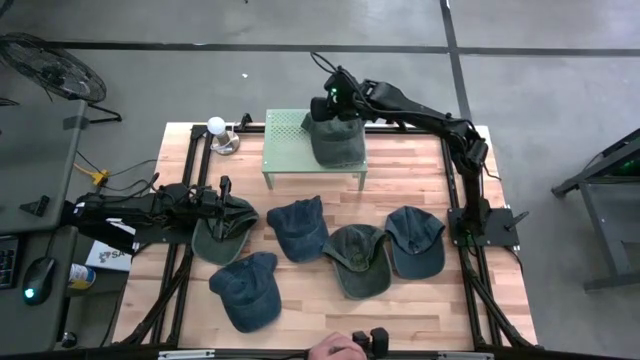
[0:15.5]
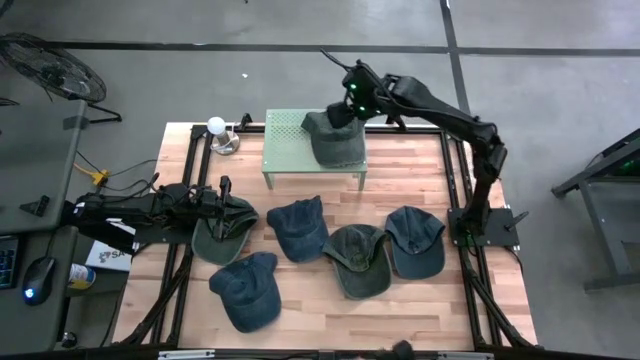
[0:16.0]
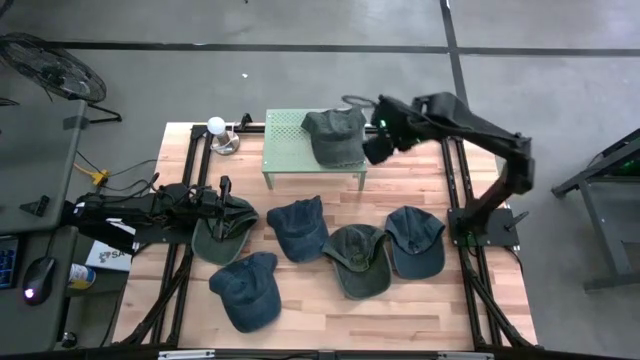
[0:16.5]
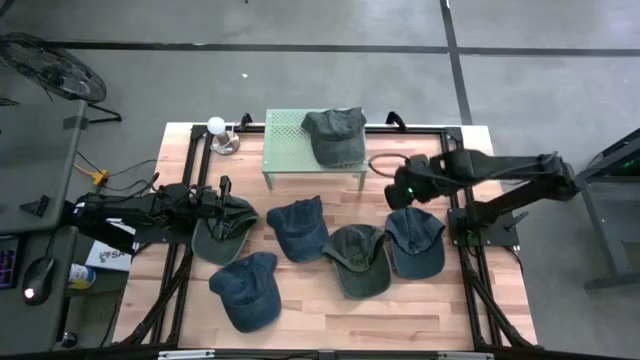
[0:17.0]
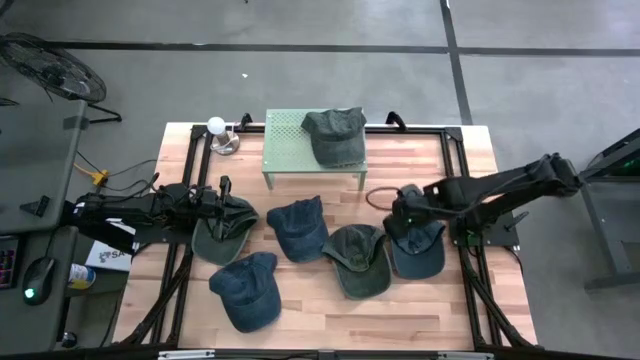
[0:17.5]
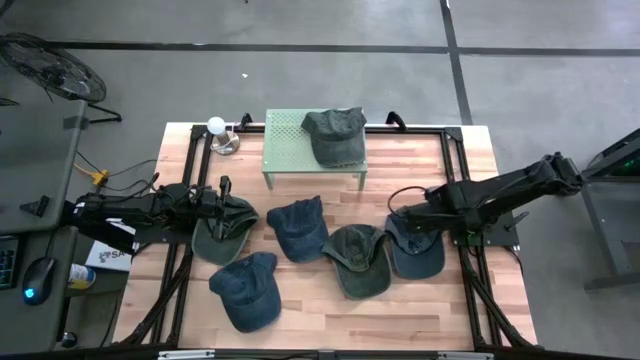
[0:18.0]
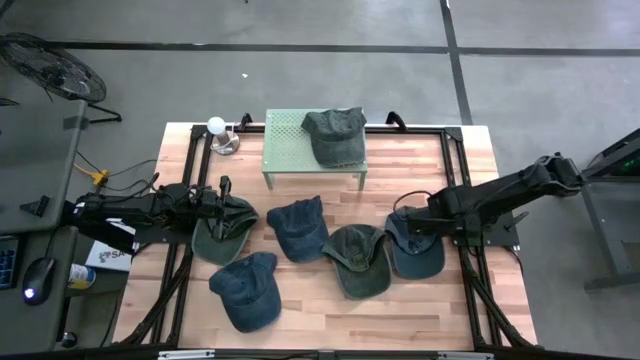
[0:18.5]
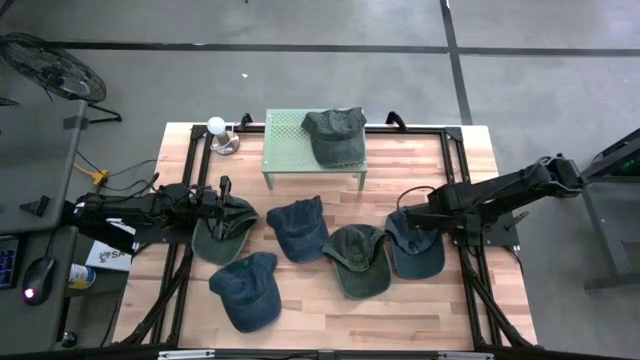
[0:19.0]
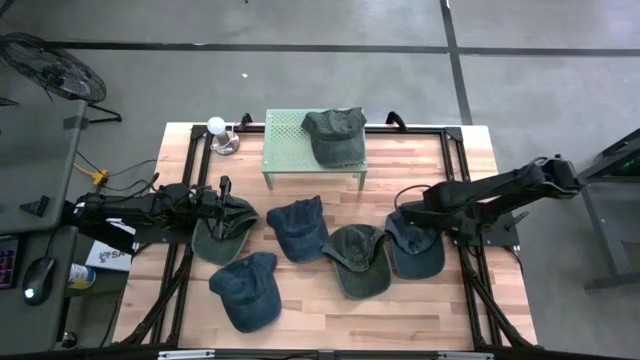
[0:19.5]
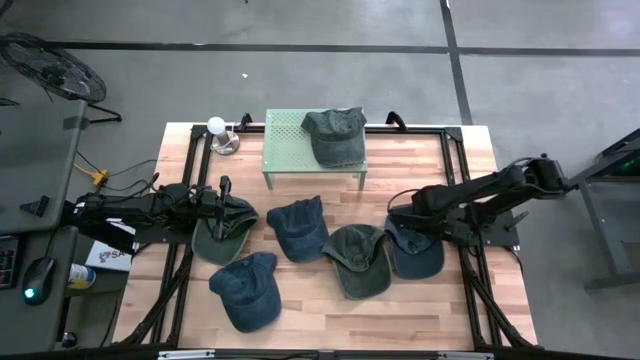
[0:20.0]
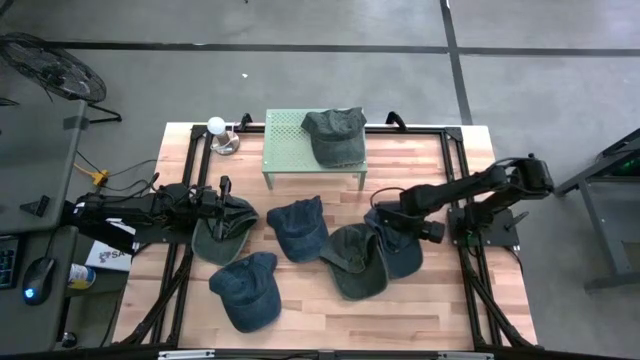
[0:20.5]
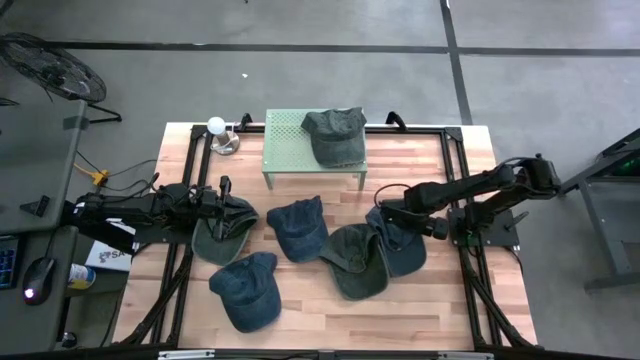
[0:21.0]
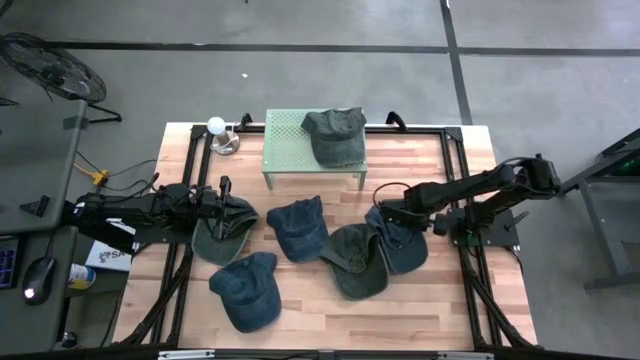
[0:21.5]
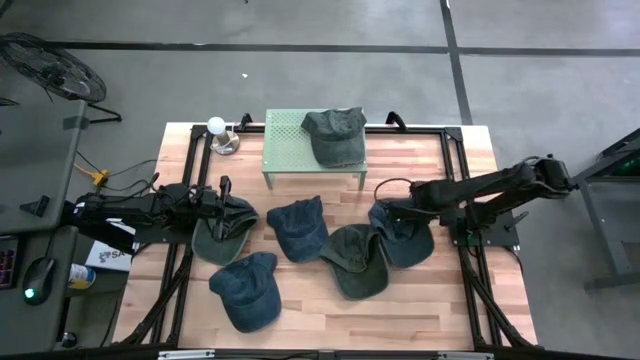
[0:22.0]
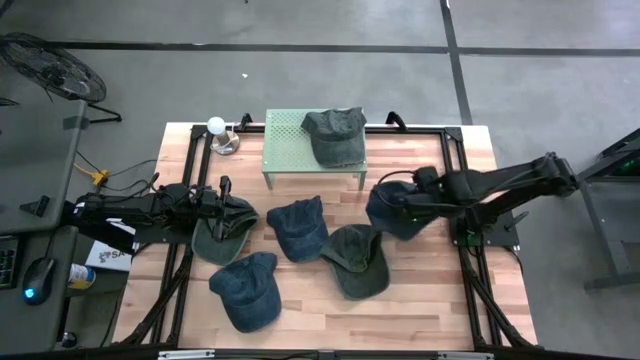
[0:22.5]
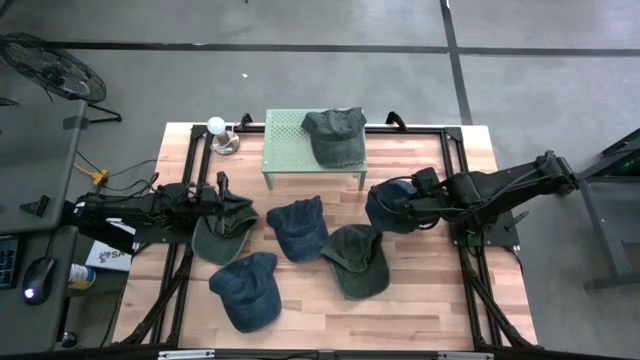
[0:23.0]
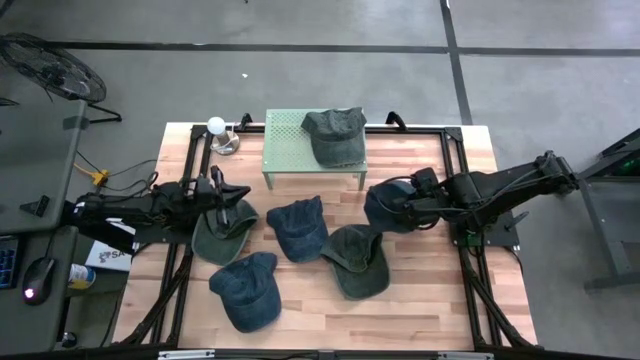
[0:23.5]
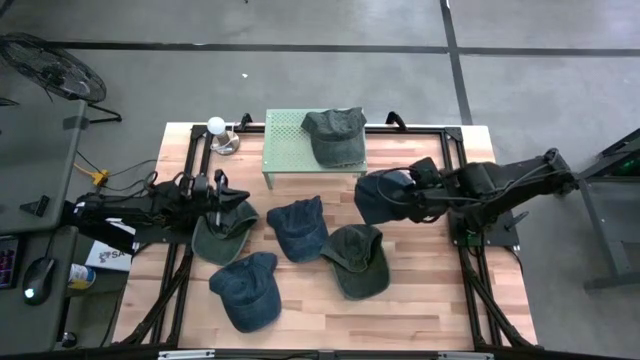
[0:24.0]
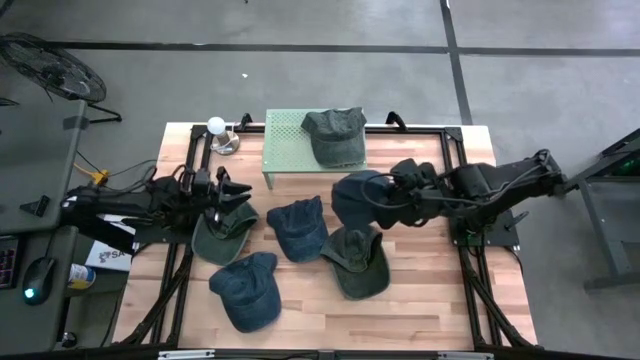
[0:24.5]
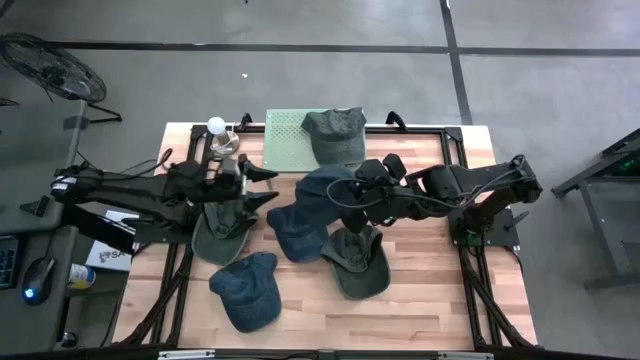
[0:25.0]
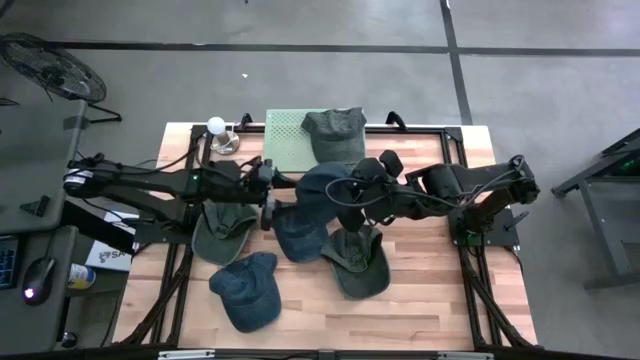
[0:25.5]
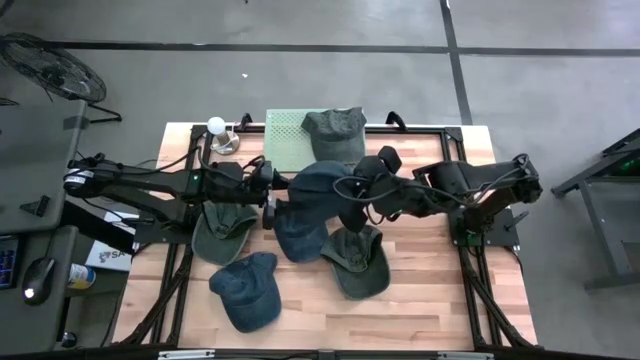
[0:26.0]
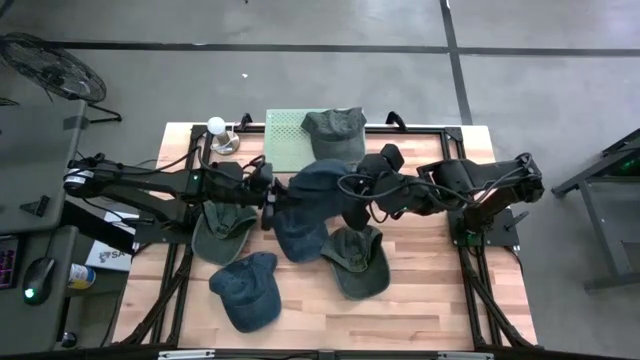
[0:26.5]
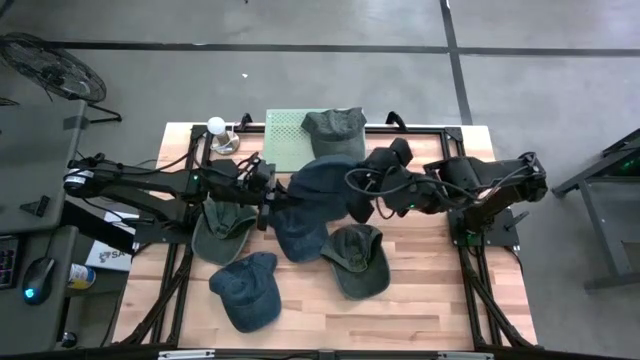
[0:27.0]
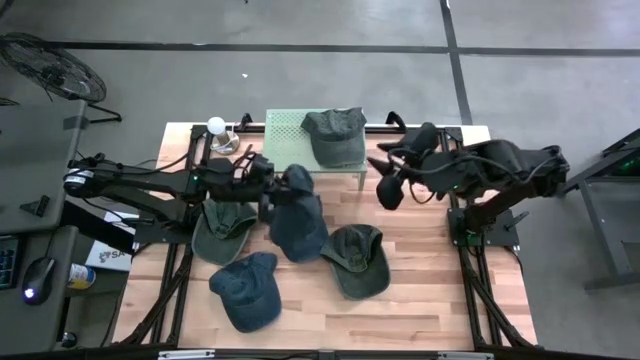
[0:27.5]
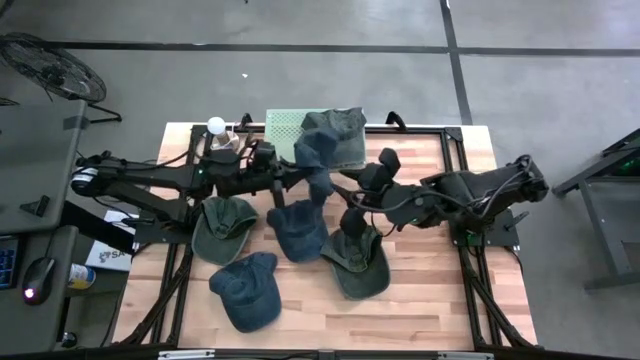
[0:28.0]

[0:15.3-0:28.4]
Task: Pick & Place hat
Put the right blue cap on the shelf

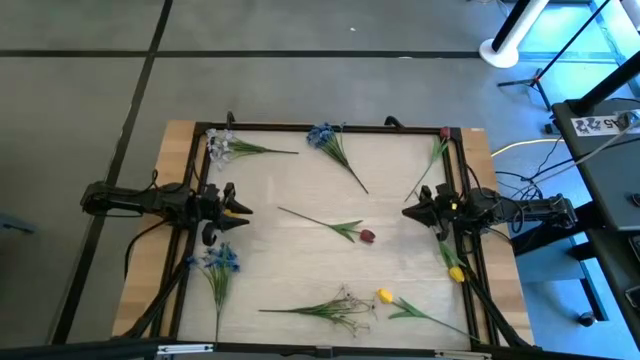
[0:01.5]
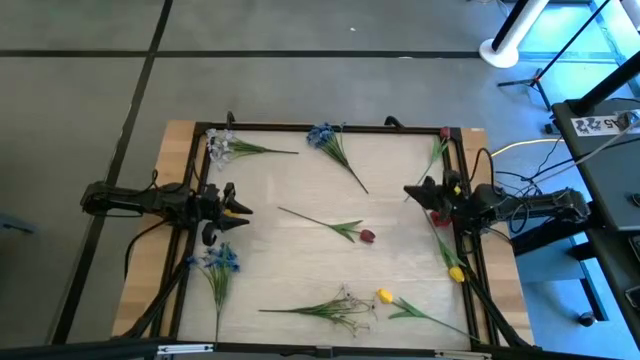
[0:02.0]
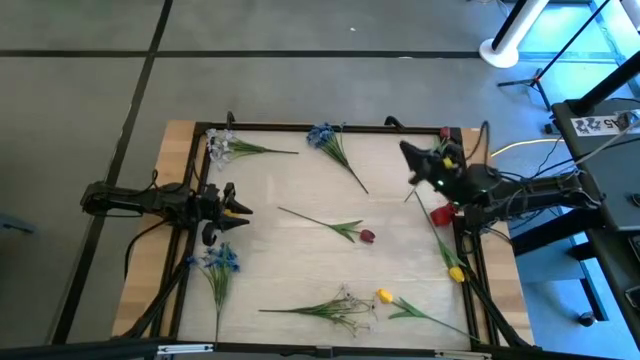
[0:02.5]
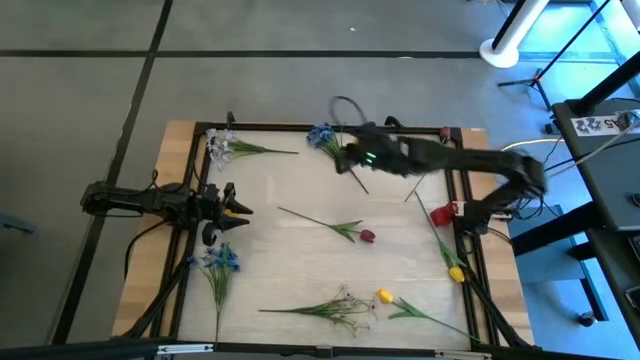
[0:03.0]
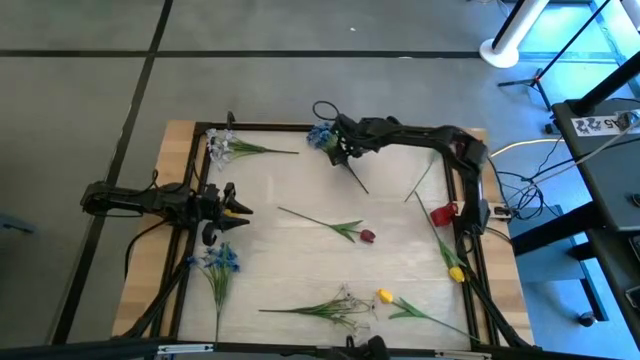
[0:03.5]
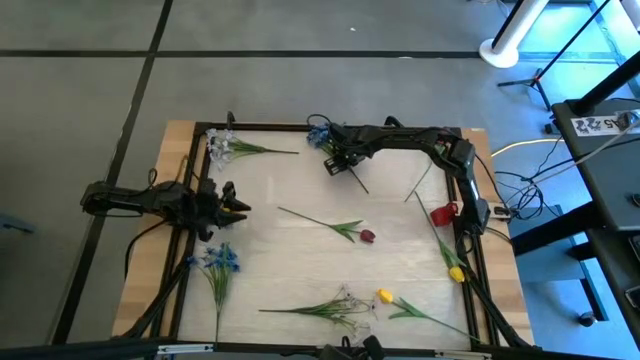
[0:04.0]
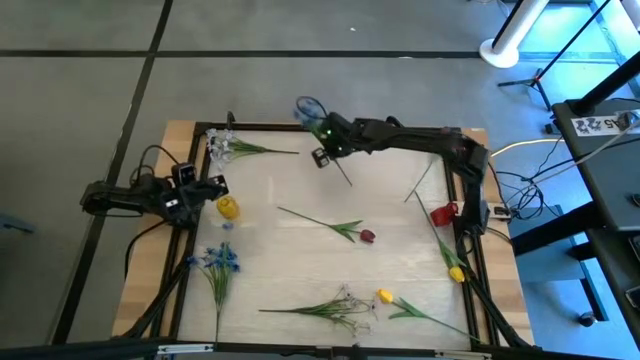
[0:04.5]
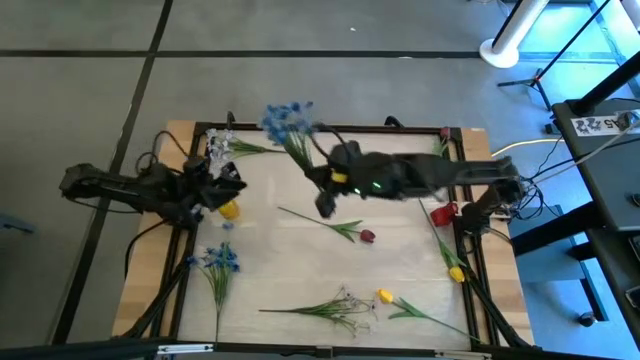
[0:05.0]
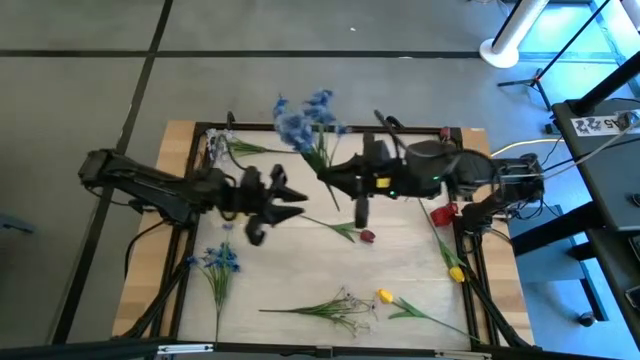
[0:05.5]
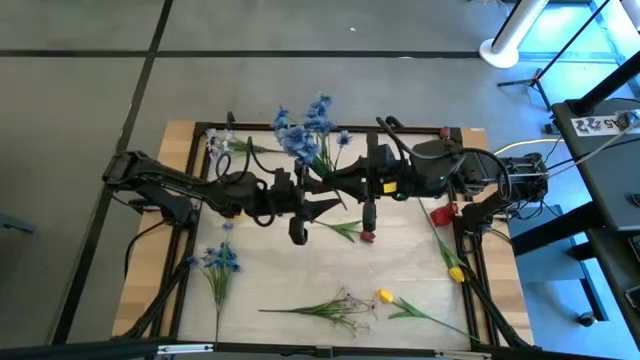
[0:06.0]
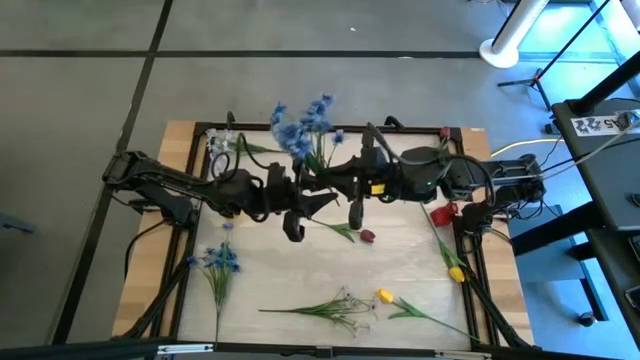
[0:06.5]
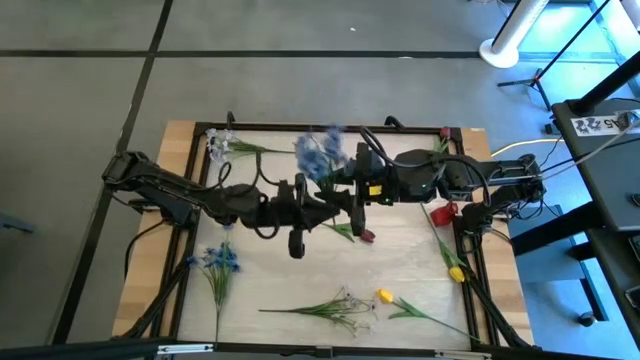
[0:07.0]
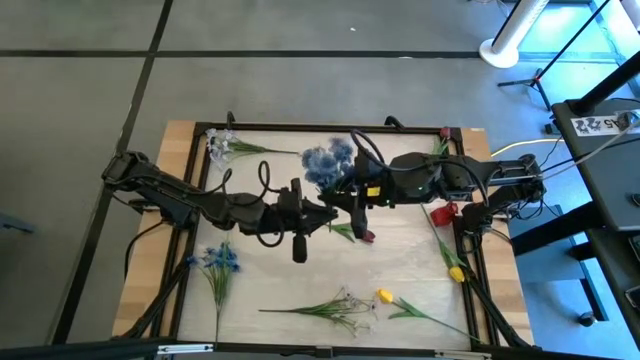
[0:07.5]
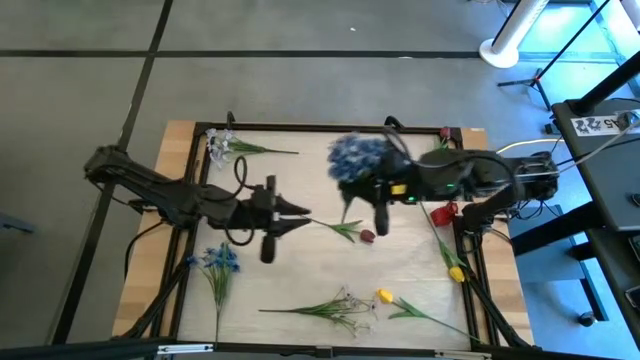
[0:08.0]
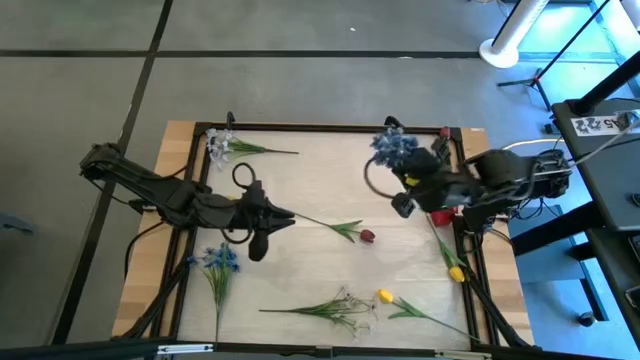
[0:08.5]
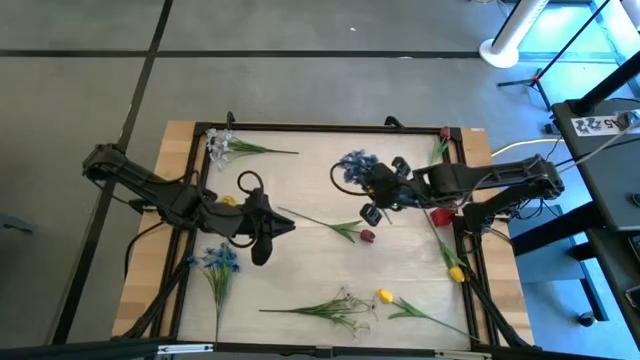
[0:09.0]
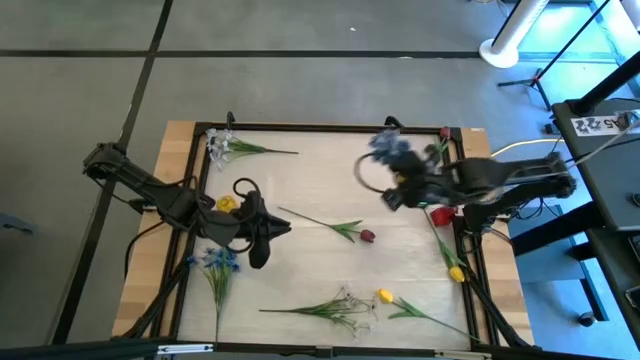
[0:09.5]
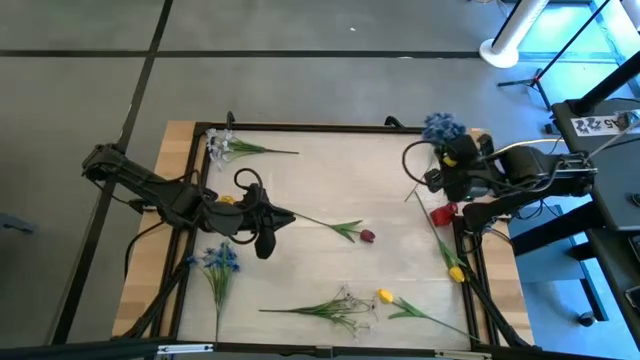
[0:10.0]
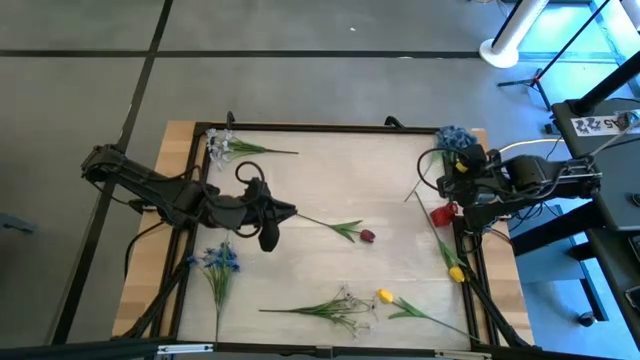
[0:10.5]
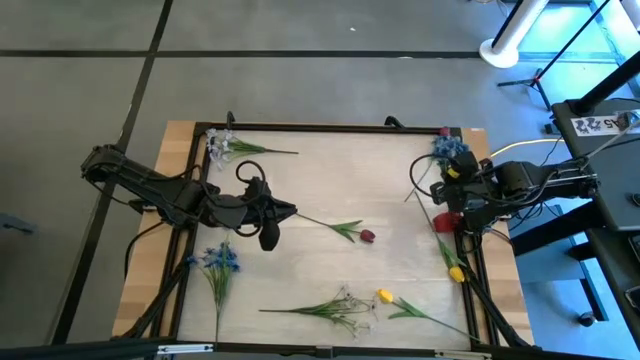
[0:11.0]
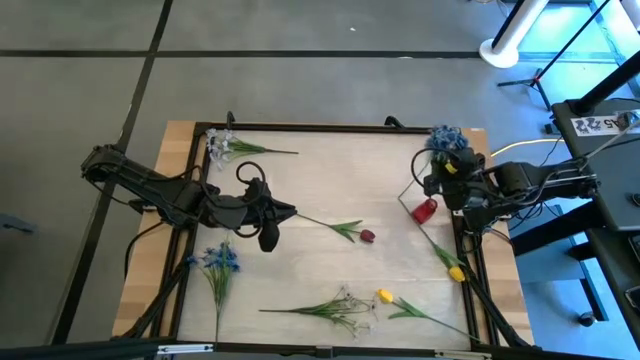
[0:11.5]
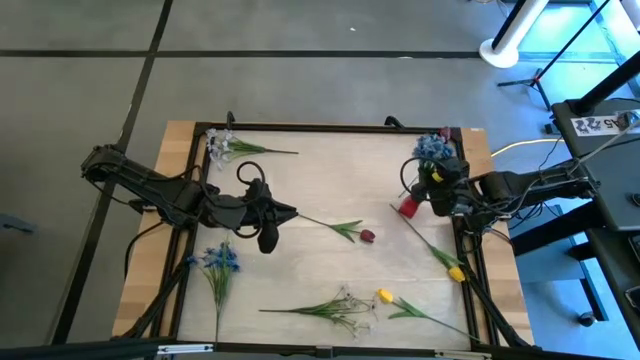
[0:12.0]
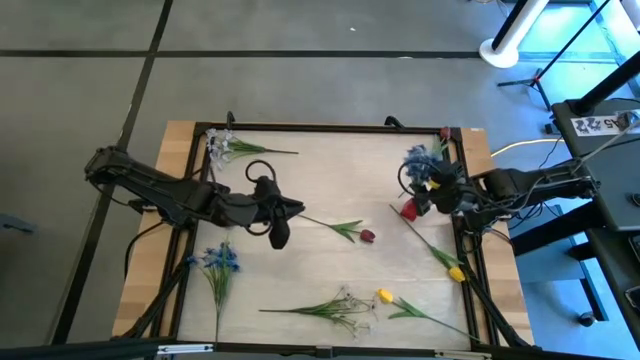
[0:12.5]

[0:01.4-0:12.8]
Task: Sort flowers into vase by color
Put the top blue flower into the red vase
